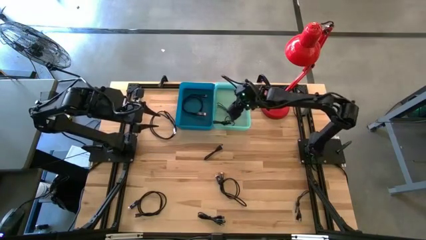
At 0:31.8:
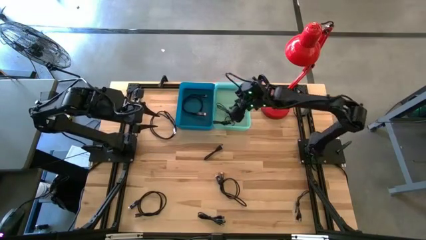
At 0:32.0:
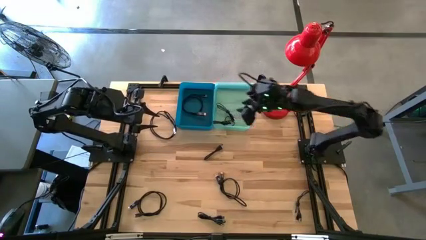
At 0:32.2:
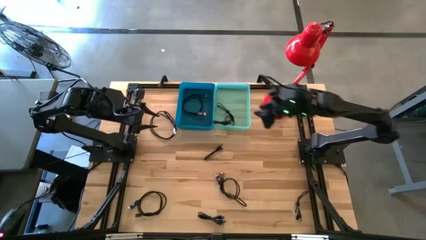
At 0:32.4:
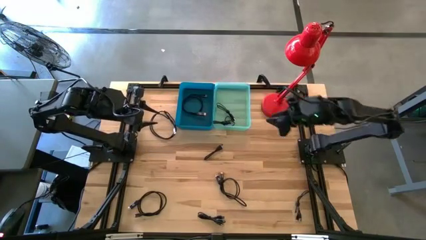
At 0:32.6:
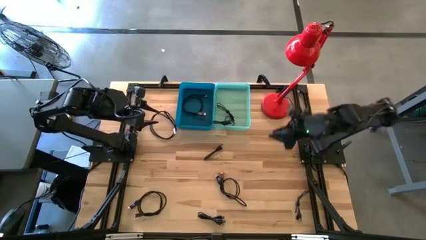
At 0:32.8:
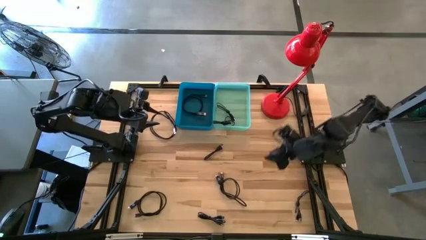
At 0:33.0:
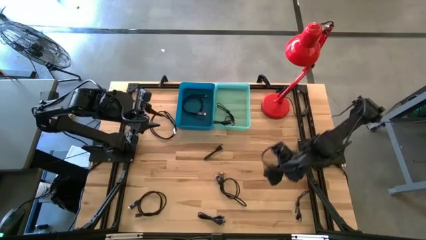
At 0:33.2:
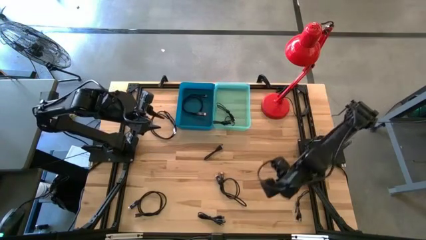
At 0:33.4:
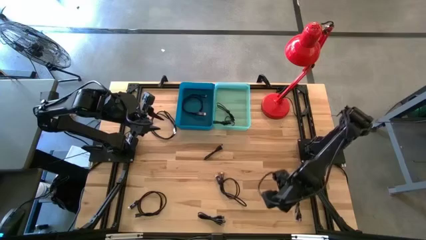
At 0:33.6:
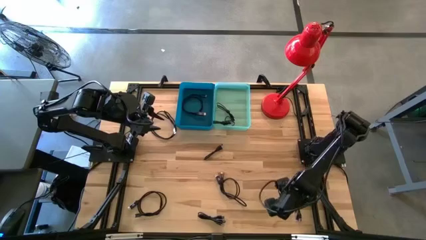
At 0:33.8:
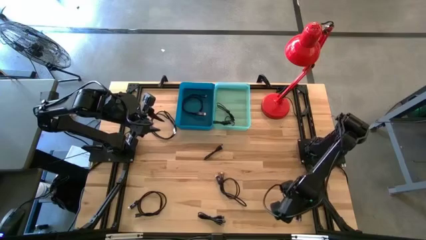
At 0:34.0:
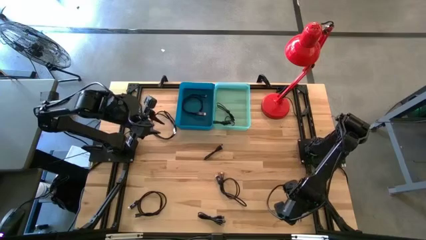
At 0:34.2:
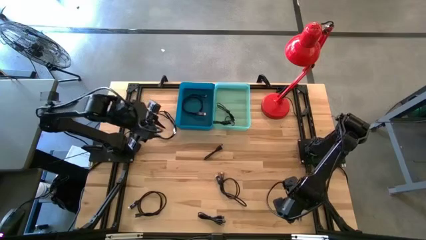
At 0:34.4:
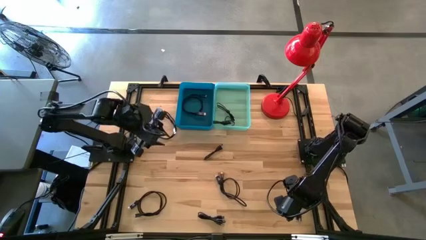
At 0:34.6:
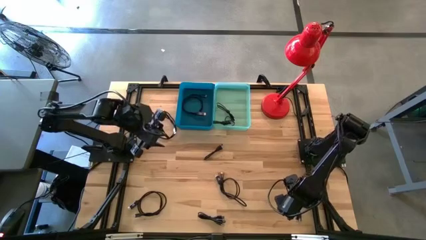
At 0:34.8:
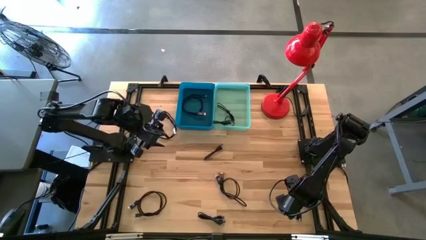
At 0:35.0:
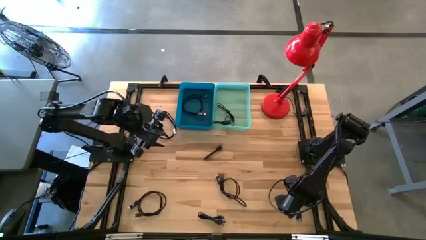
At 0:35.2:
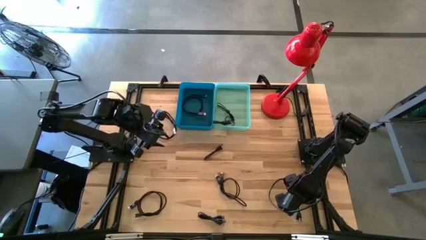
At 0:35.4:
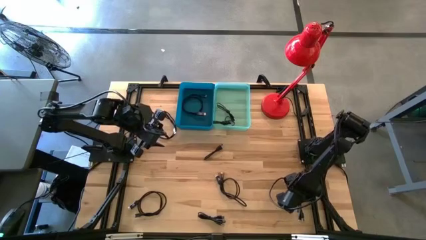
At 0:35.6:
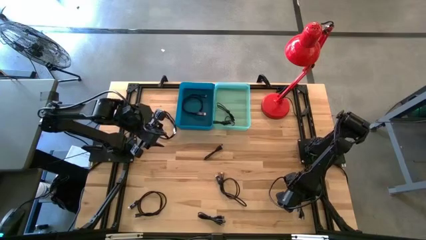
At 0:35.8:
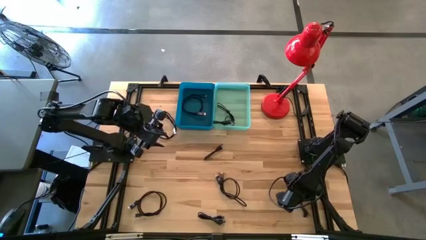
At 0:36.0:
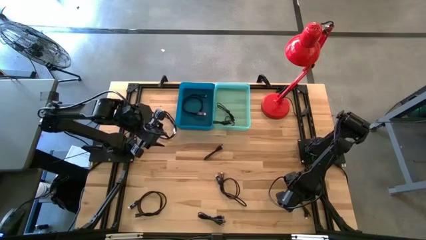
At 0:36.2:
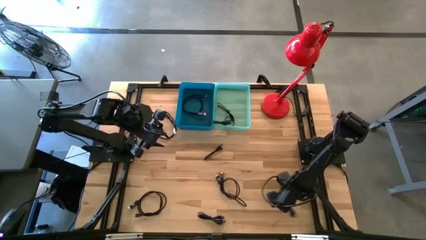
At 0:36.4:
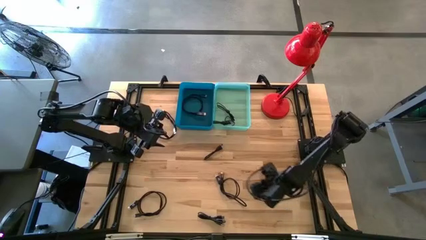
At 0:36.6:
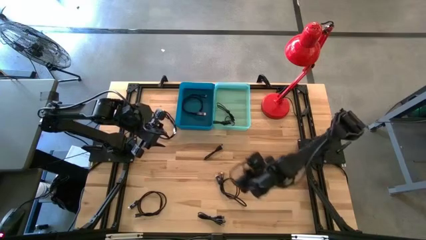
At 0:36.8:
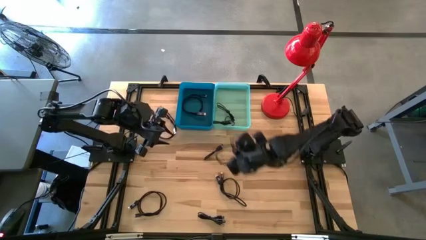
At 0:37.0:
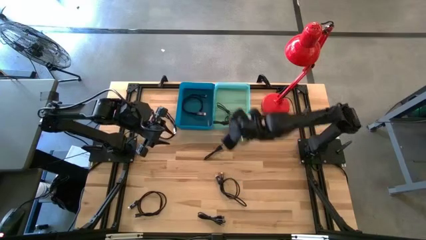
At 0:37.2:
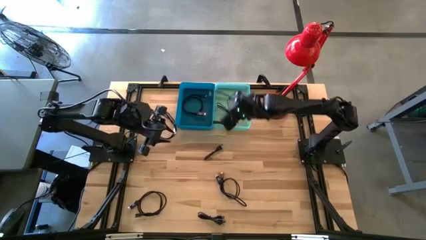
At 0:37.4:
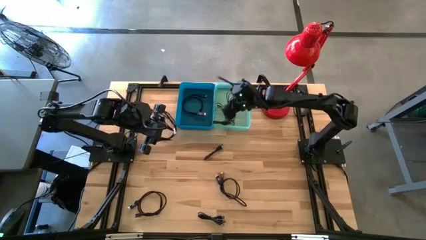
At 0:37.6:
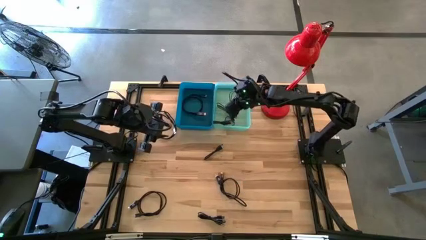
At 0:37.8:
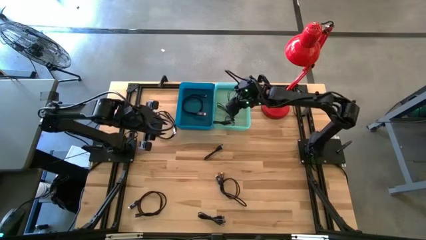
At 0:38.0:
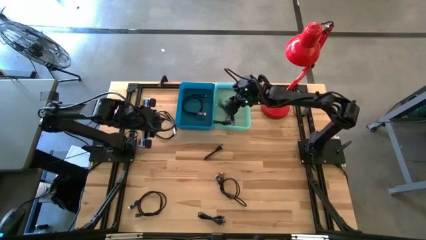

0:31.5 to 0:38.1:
Task: Pick & Place USB Port
Put the black usb cable into the light blue bin

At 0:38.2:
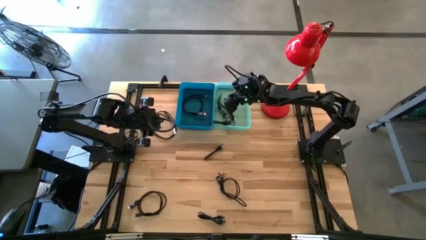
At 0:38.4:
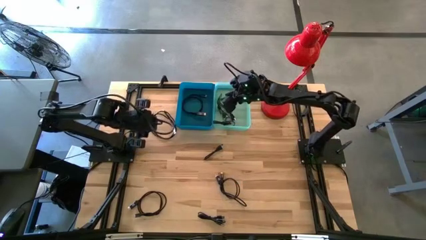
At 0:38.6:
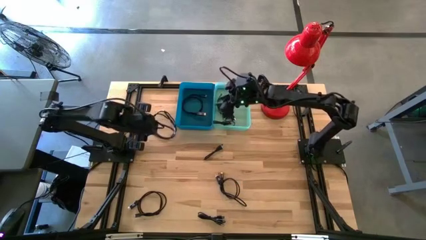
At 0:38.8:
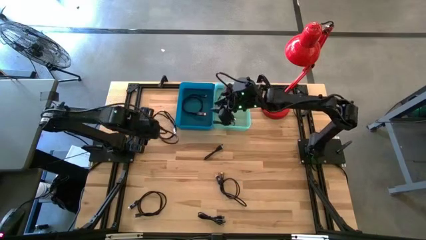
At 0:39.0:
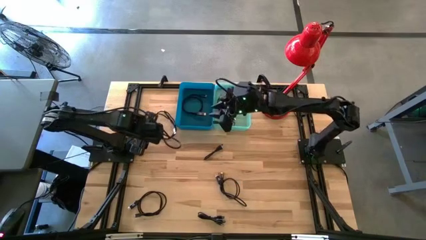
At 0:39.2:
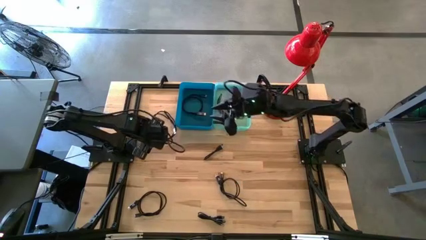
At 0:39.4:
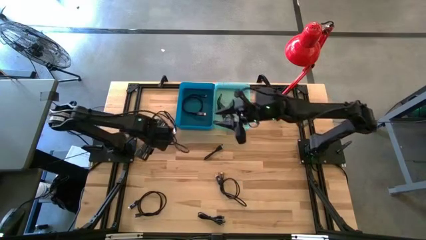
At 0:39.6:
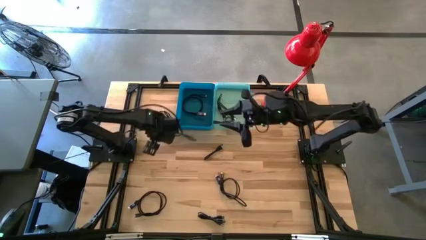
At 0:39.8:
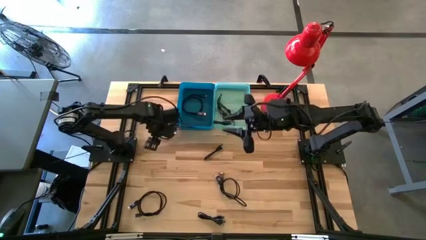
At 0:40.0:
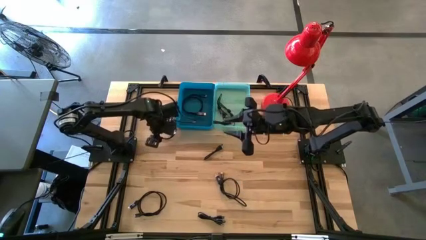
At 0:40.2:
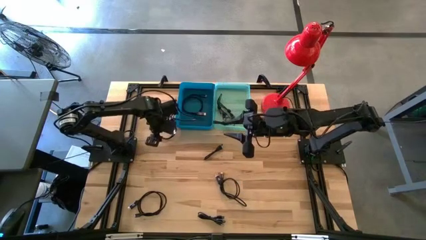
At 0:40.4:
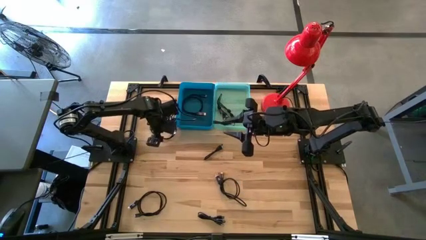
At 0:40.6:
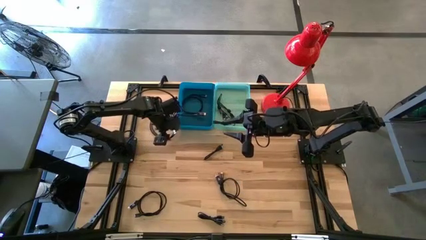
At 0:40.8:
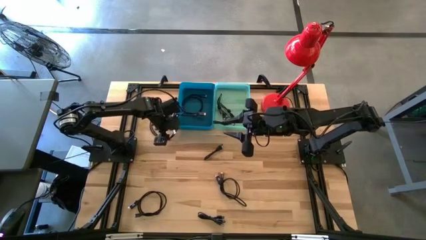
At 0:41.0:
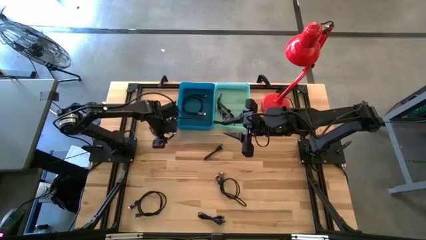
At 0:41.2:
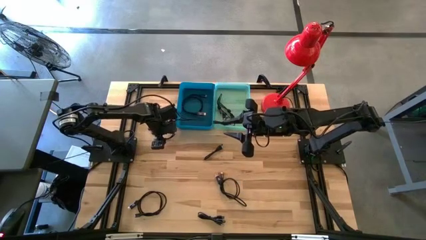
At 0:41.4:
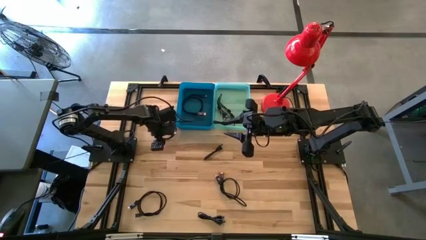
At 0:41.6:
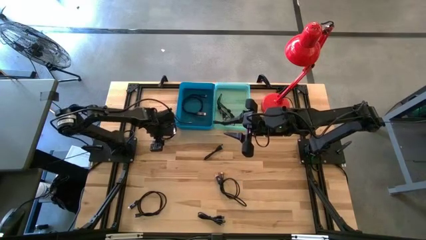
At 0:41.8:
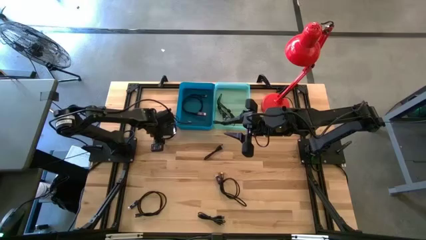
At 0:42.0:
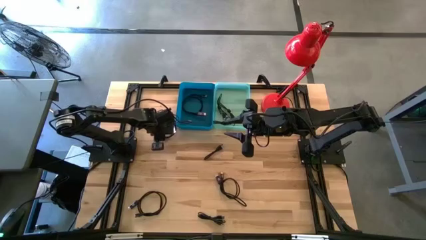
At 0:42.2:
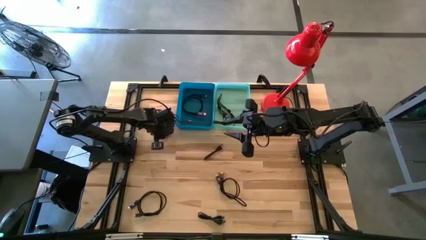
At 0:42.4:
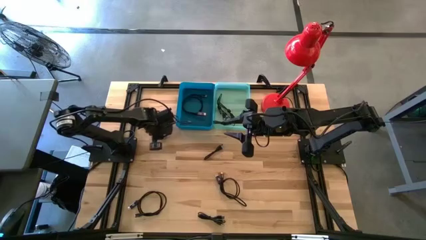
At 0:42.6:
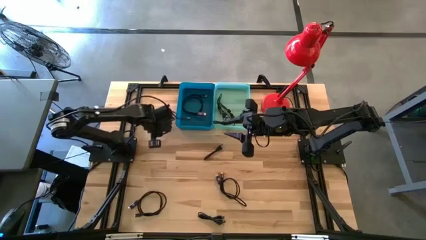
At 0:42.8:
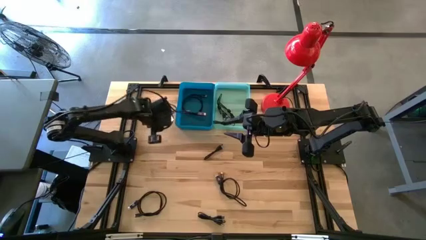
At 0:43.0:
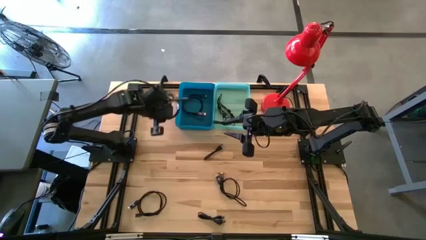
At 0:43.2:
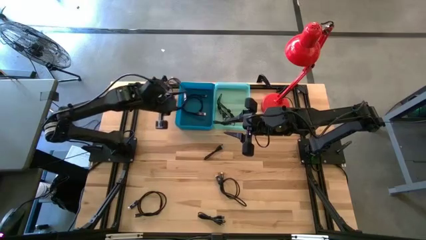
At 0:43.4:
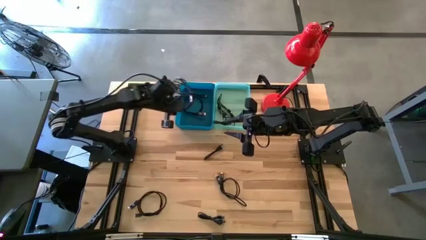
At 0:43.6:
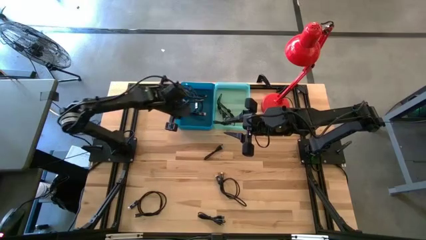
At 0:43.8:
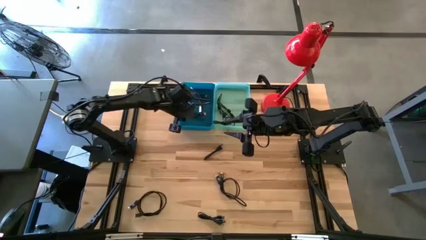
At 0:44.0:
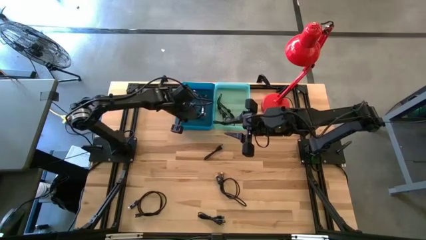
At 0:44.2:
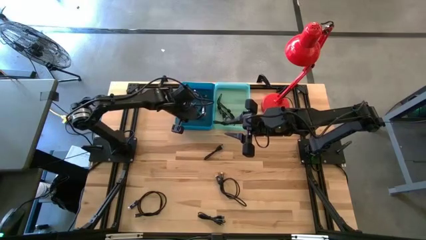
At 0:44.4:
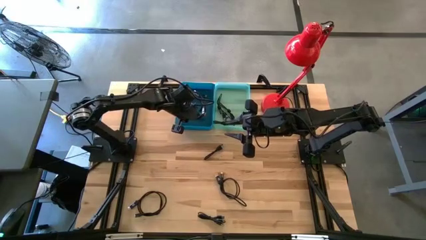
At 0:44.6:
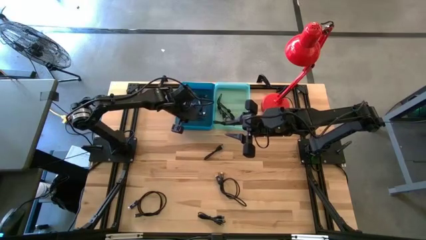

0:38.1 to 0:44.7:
Put the black charger cable into the dark blue bin

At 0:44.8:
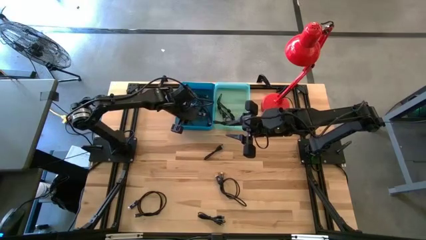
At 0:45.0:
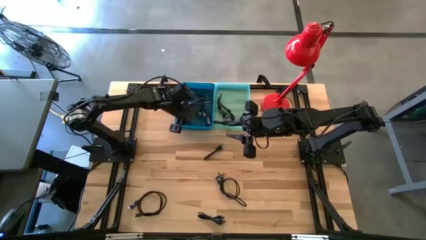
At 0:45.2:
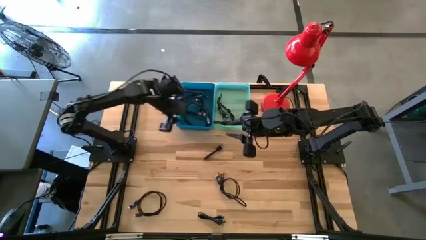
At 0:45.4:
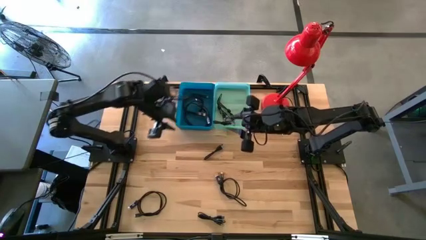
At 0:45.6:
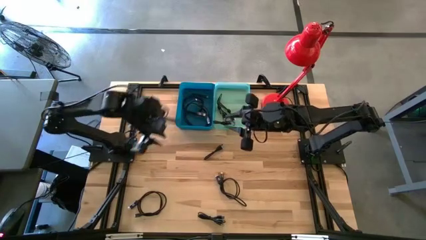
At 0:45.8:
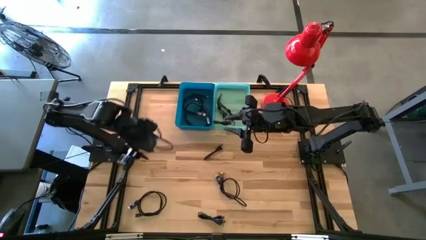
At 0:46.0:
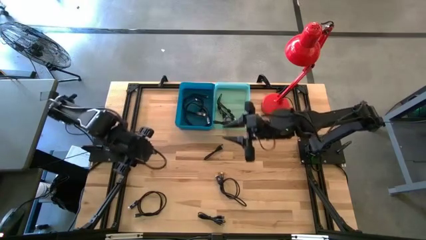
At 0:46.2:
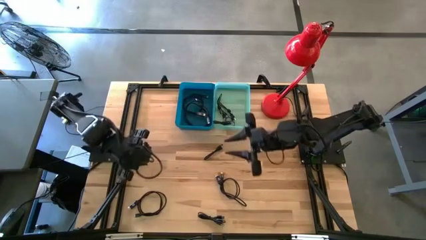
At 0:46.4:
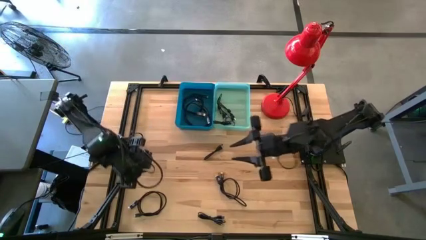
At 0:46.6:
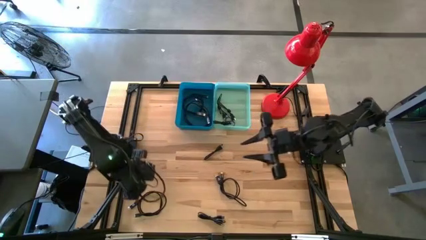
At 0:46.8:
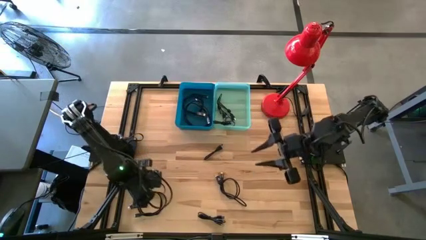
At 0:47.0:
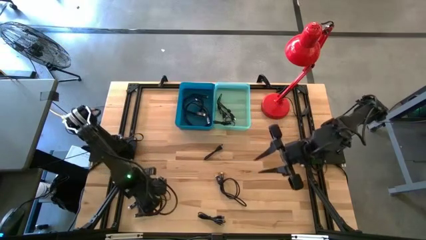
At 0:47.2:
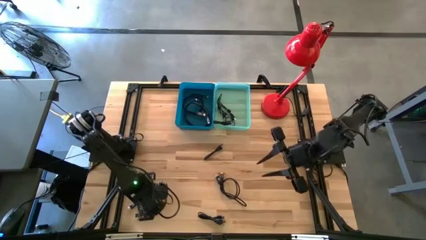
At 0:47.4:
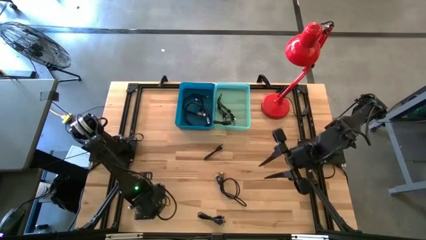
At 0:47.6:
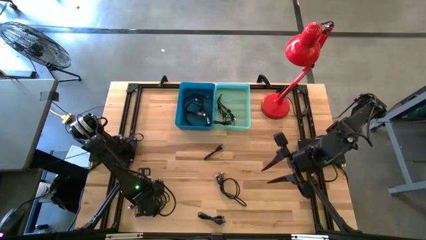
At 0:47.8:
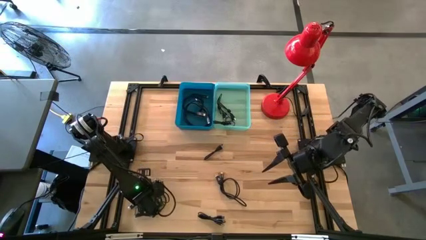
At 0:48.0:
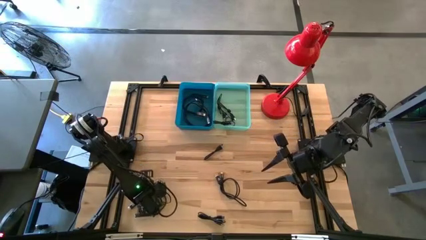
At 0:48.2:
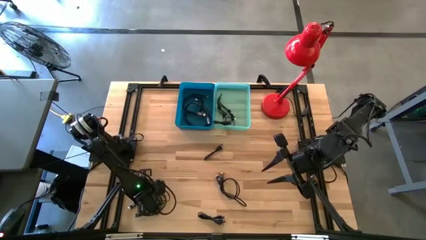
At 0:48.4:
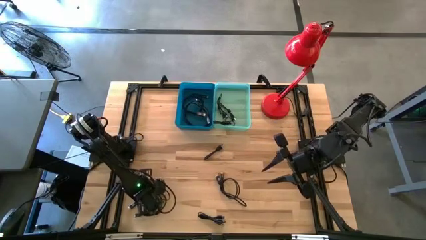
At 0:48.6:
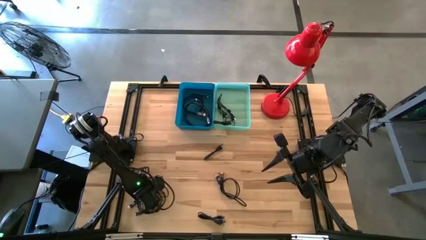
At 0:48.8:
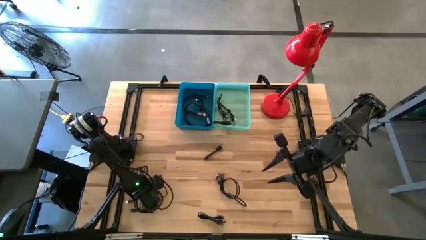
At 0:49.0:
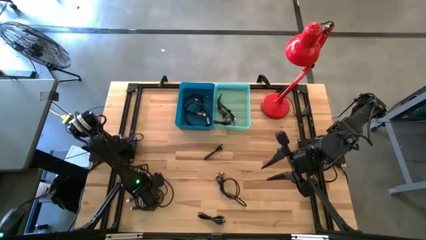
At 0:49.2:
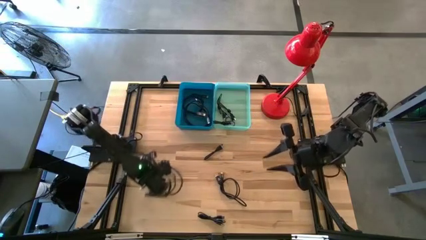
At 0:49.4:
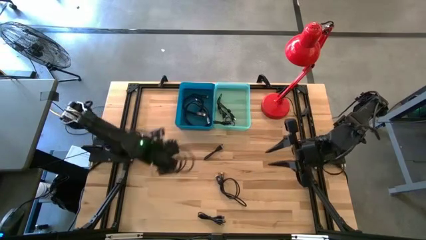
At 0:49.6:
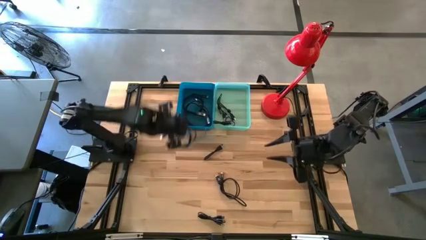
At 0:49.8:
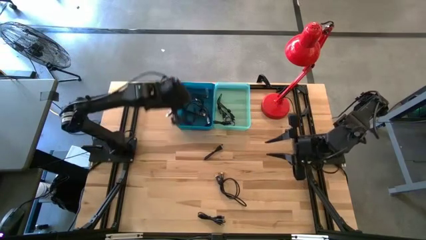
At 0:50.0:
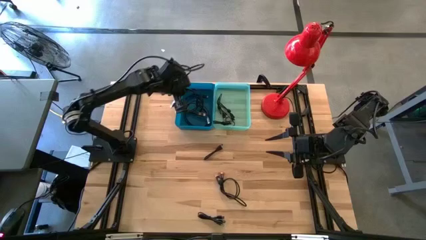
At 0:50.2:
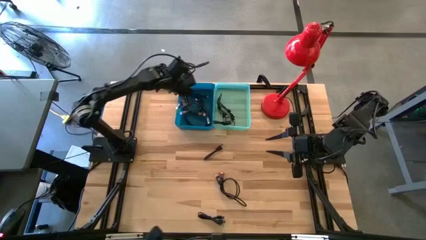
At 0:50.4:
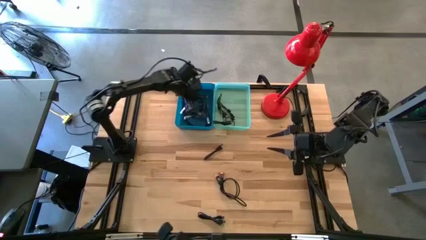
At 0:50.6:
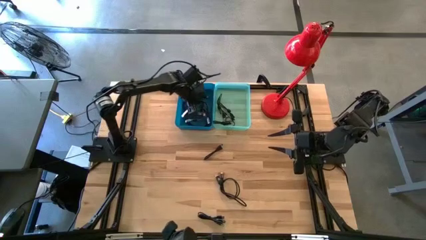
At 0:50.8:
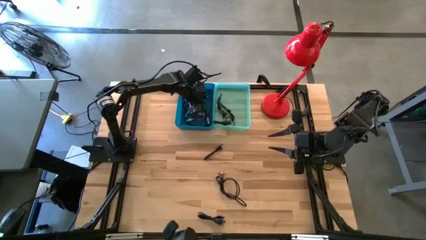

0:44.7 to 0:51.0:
Put the black charger cable into the dark blue bin
